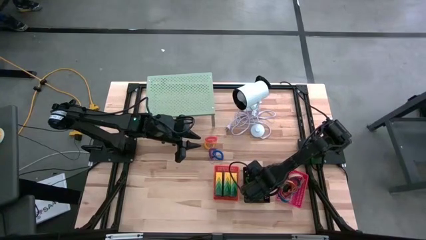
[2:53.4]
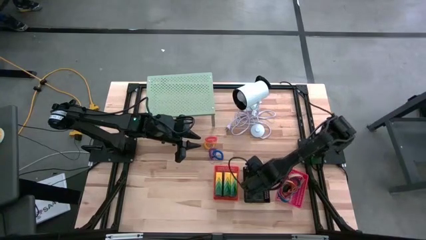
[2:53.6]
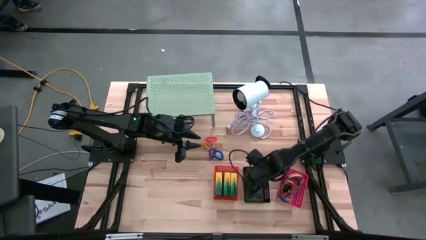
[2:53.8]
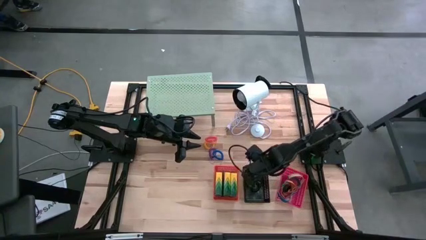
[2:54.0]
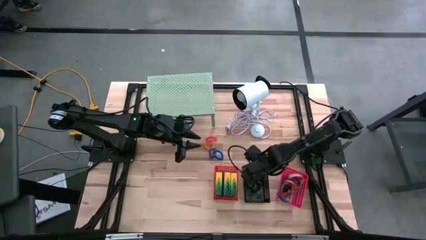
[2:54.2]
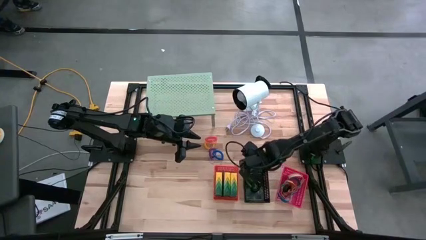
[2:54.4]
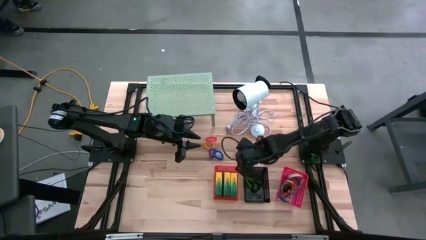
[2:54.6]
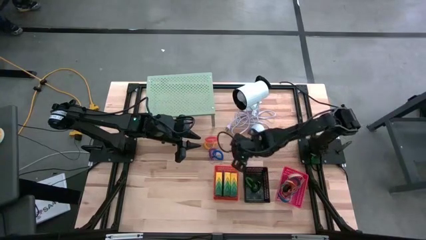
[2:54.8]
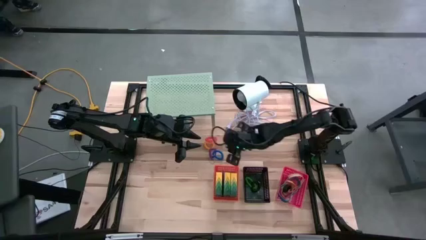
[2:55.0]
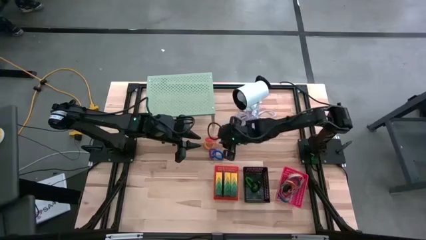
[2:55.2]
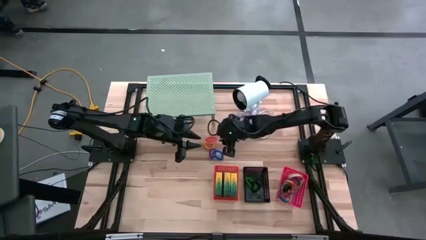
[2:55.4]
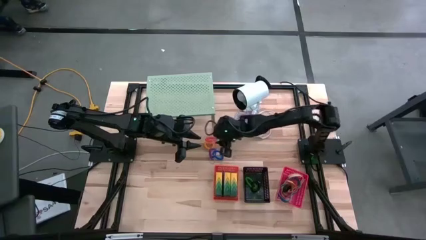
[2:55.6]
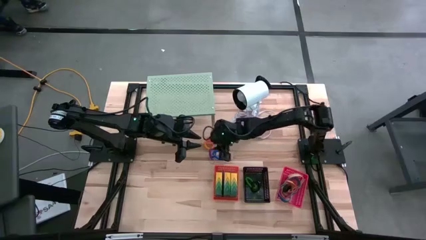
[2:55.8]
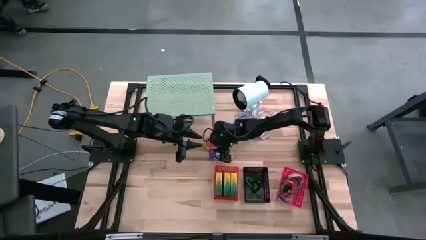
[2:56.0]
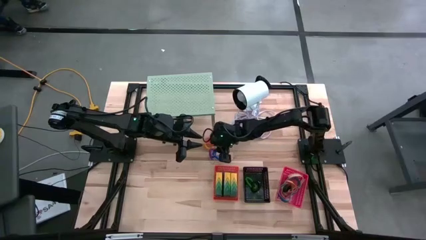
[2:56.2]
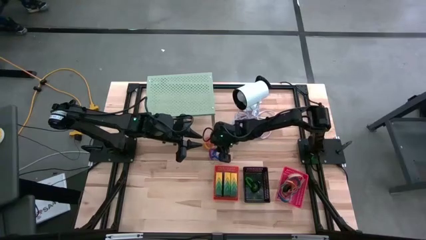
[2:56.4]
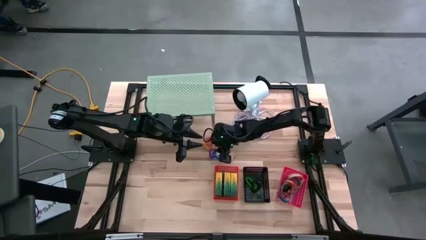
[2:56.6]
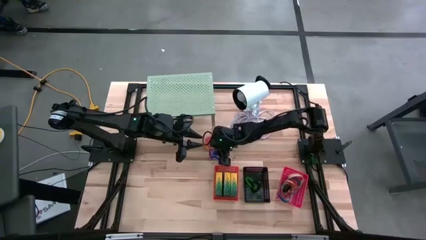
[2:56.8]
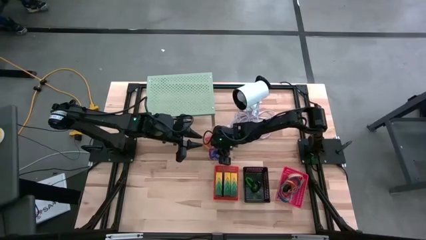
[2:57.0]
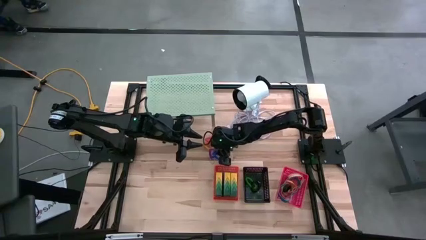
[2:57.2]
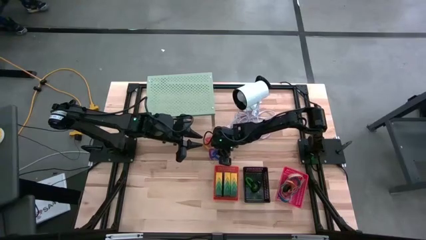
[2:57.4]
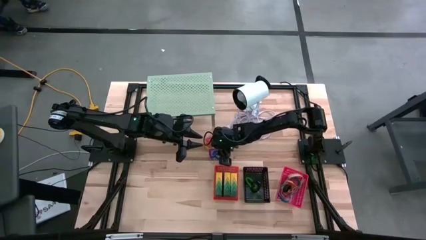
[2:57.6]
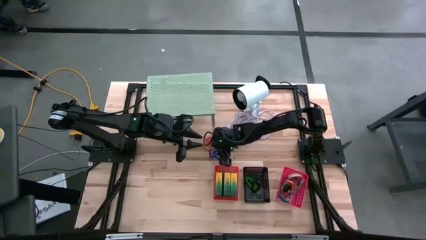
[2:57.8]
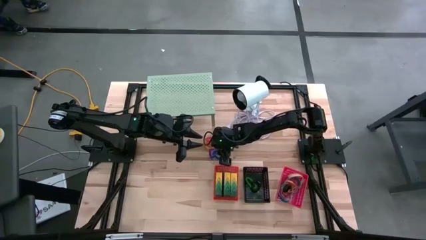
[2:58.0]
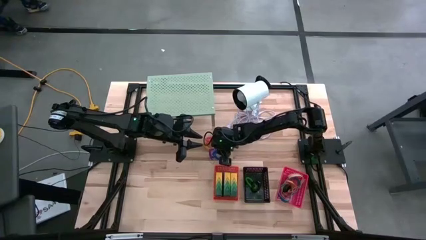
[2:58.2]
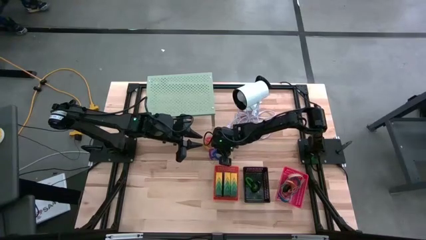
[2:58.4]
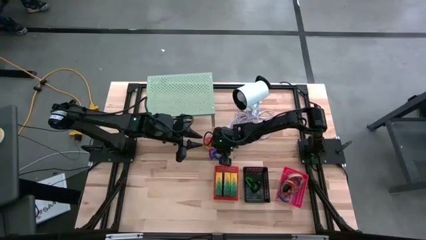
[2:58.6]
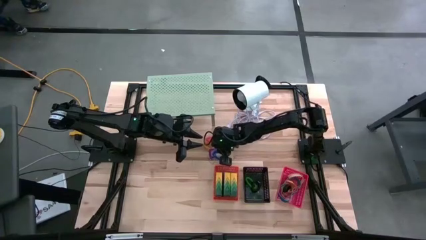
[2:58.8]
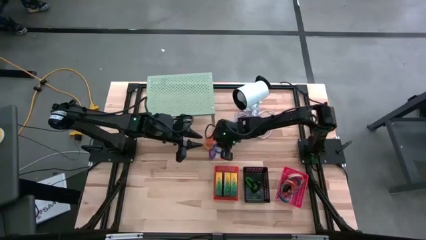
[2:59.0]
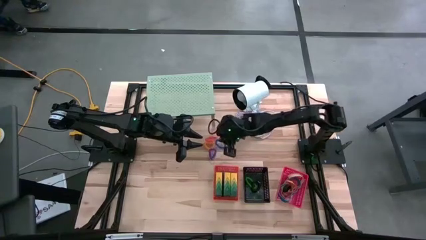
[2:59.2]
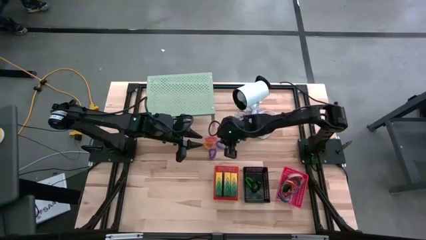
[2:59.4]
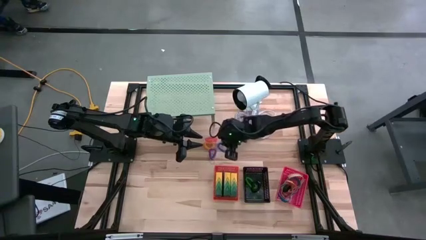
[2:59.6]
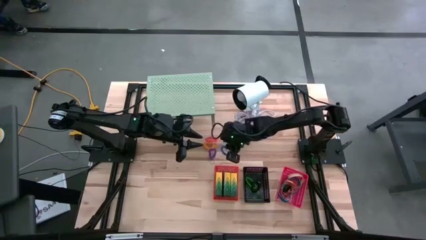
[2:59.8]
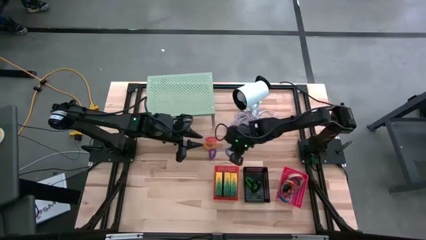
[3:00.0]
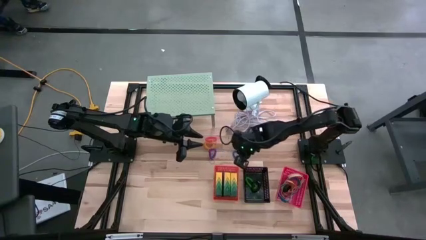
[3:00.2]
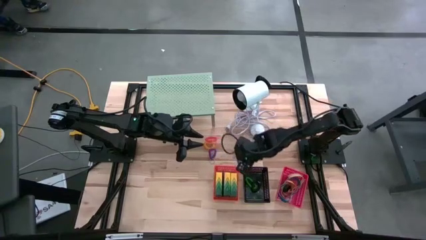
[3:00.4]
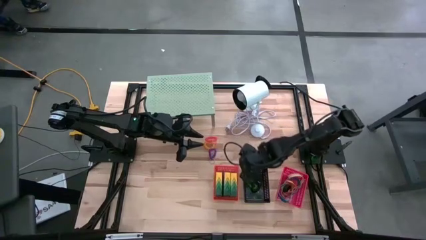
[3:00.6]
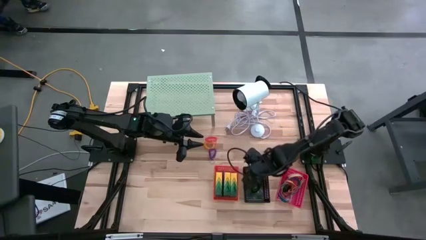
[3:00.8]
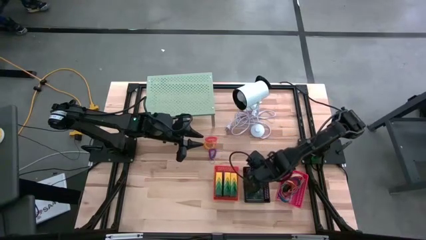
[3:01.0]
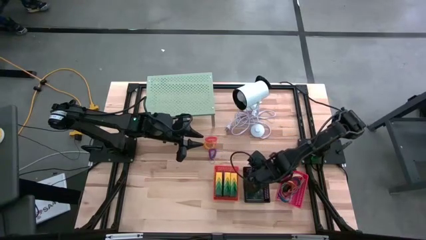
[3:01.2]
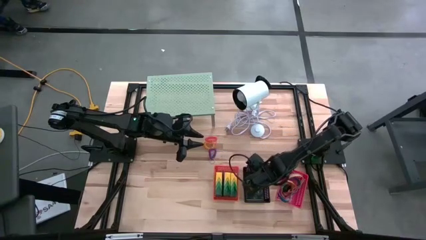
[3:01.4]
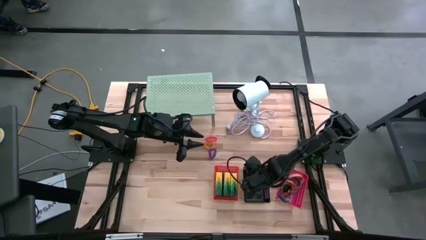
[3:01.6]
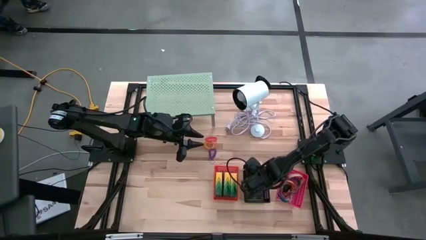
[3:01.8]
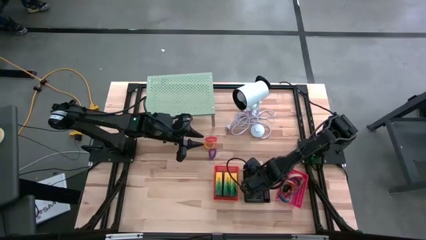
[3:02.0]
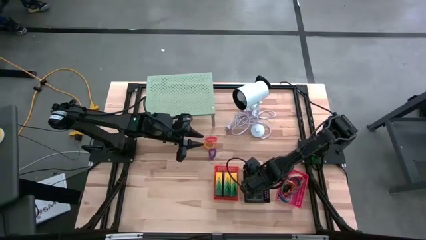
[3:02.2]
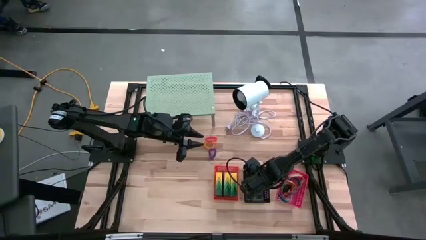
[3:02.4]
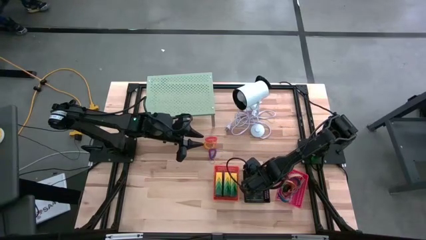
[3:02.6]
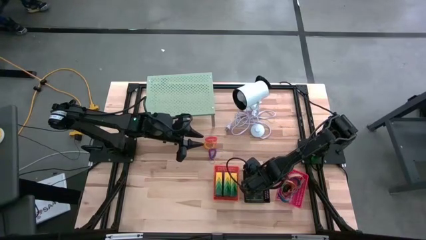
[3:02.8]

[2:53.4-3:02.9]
Task: Pick & Place Office Desk Supplies
Put the blue wrist coil into the black basket

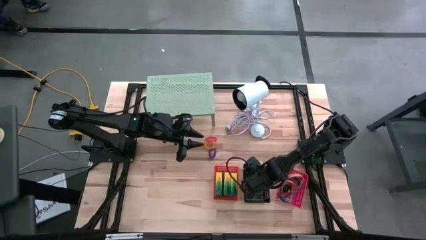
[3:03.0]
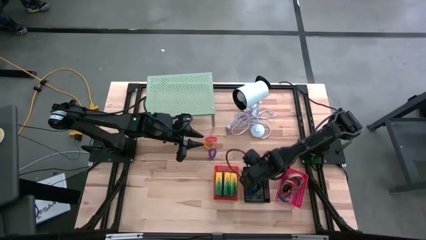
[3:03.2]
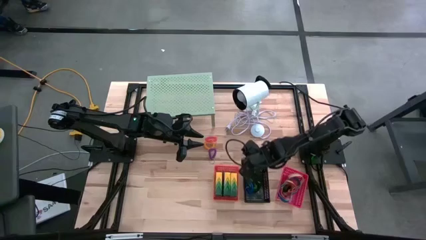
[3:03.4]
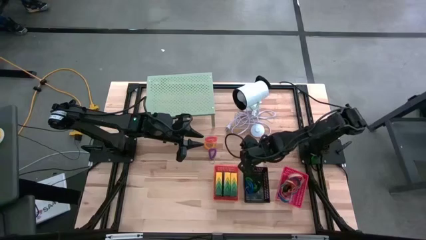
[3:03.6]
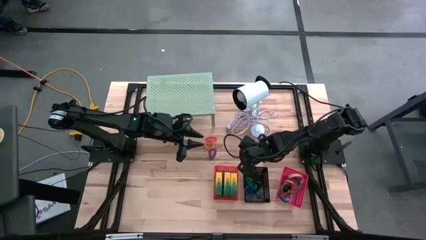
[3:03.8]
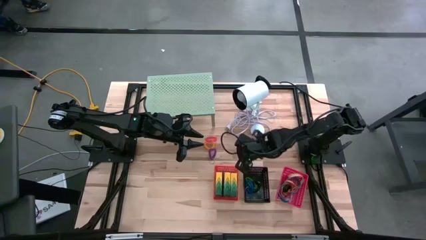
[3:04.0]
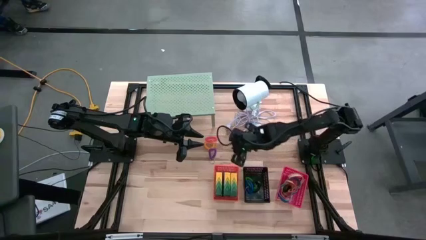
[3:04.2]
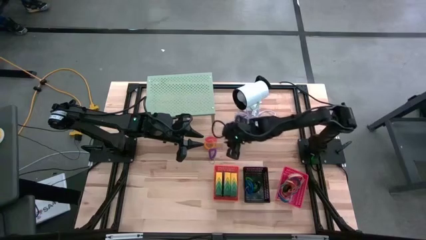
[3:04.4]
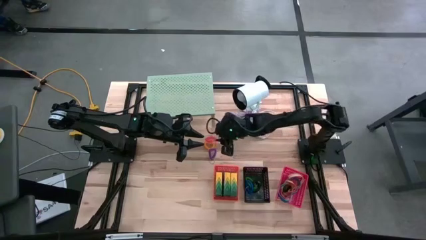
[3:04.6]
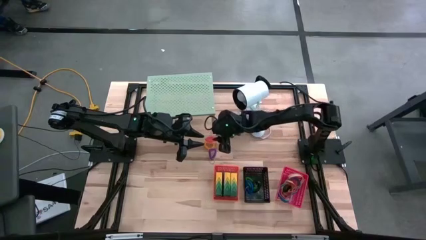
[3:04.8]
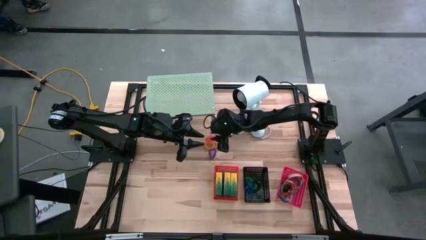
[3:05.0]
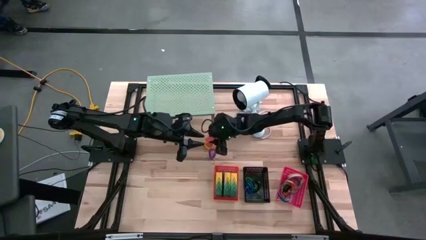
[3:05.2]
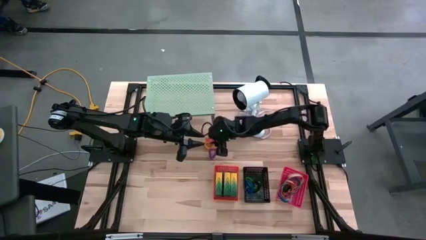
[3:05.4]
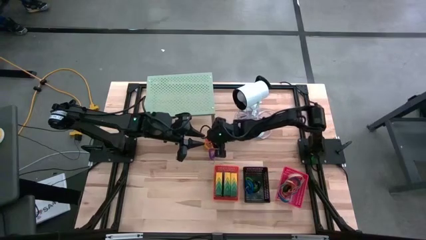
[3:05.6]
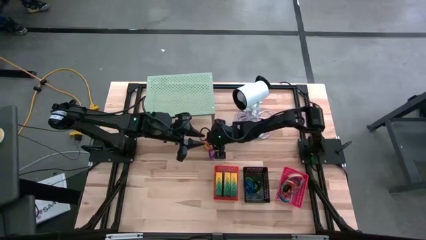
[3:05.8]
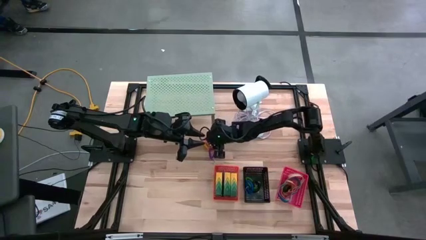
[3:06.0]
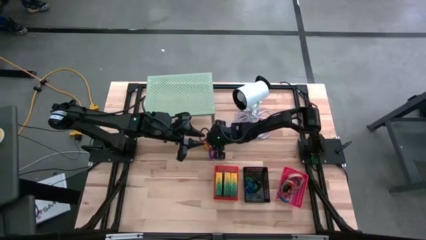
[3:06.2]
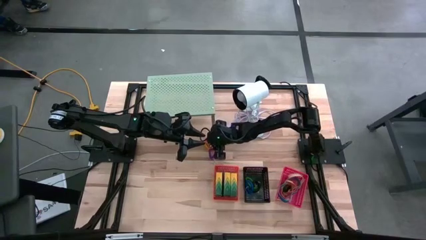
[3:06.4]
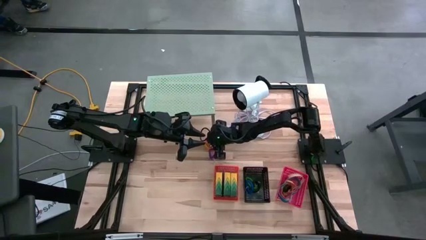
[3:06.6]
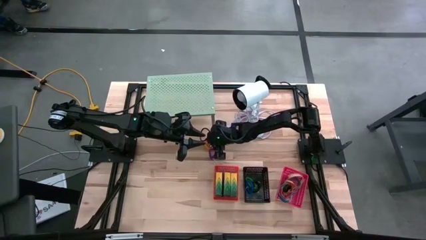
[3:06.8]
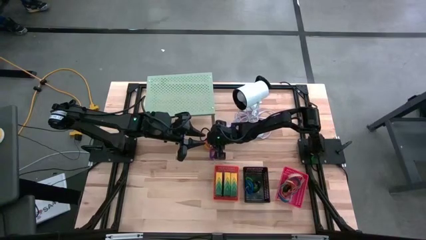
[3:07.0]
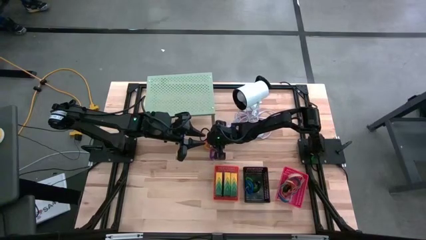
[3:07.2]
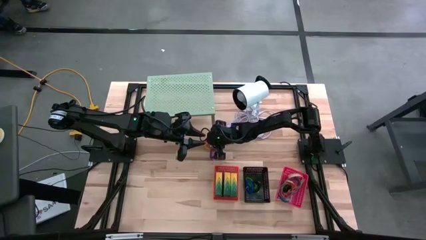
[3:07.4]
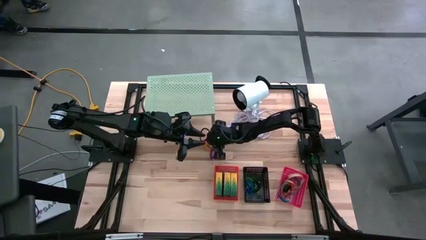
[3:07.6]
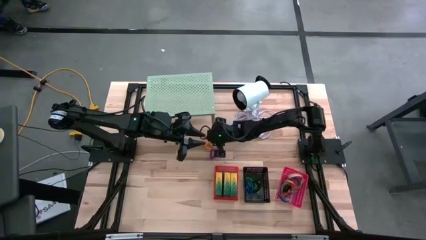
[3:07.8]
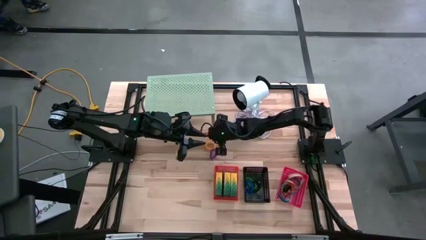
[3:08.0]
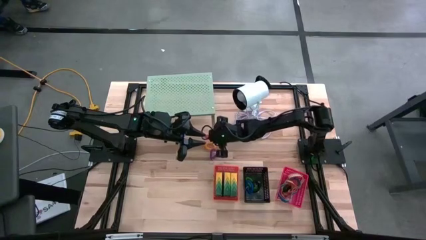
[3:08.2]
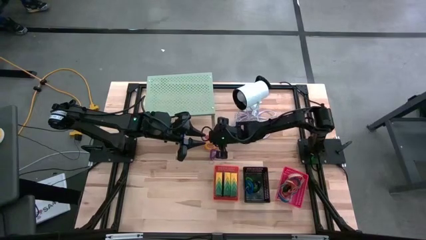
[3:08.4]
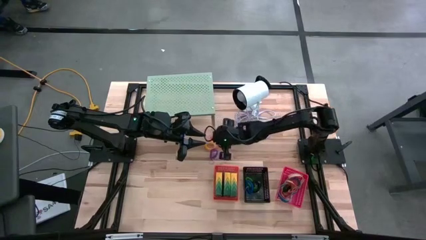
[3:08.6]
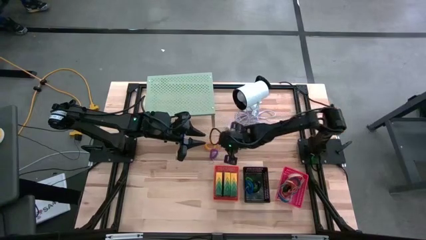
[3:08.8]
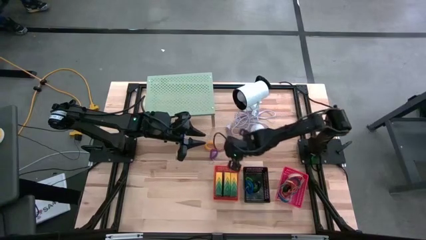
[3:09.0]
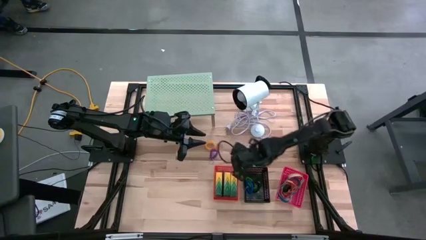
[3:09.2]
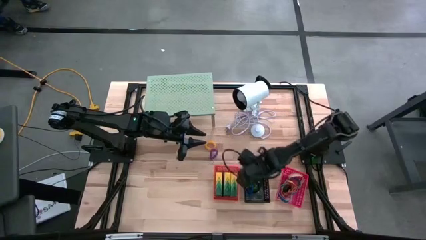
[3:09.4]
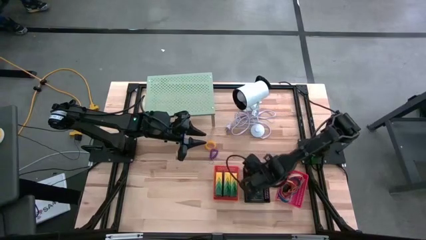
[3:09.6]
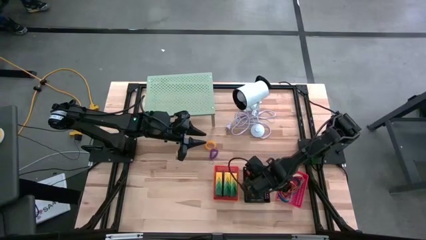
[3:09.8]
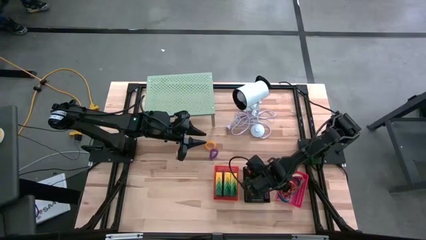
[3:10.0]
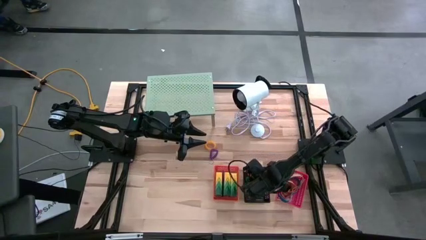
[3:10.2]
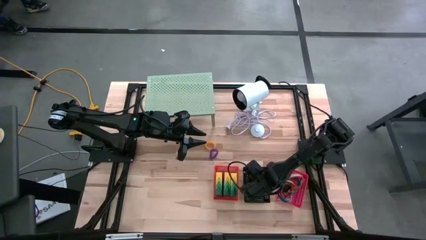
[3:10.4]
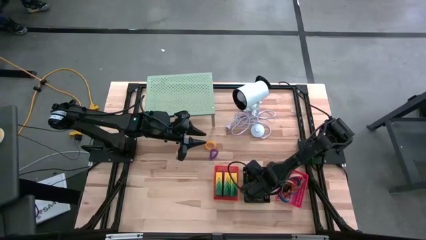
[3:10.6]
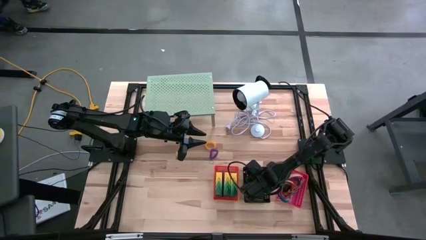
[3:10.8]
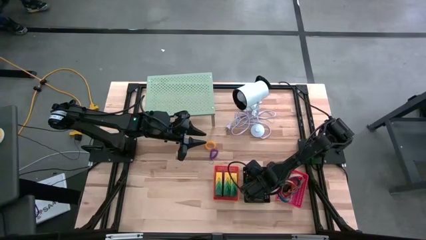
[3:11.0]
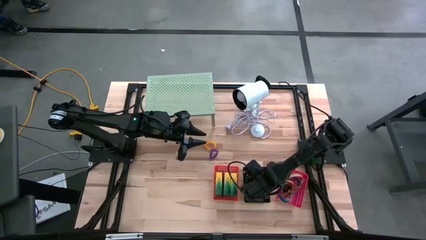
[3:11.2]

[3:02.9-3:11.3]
Put the orange wrist coil into the black basket
